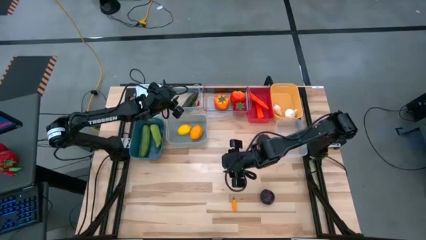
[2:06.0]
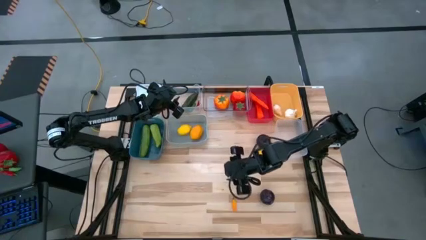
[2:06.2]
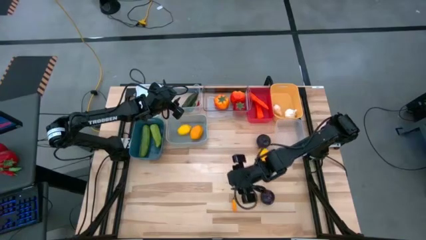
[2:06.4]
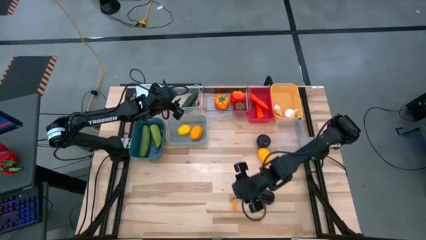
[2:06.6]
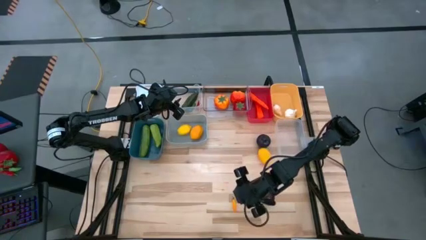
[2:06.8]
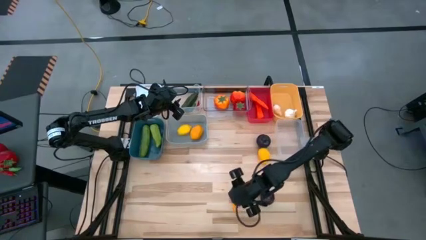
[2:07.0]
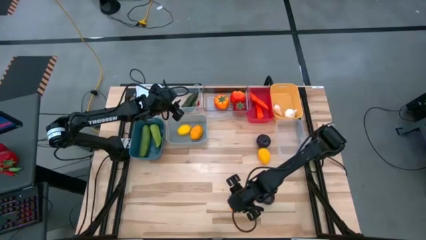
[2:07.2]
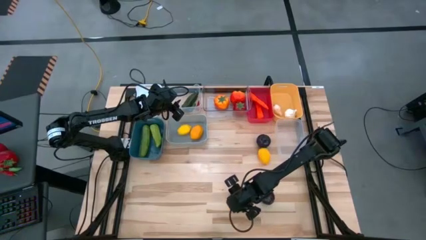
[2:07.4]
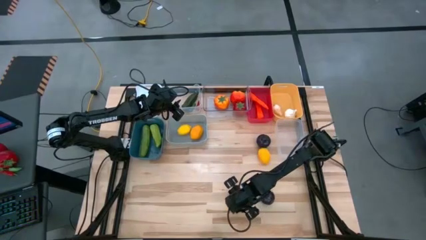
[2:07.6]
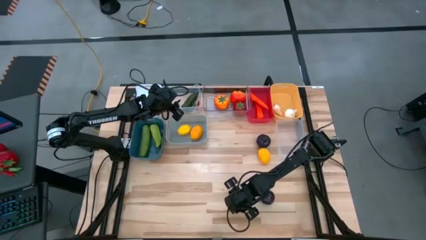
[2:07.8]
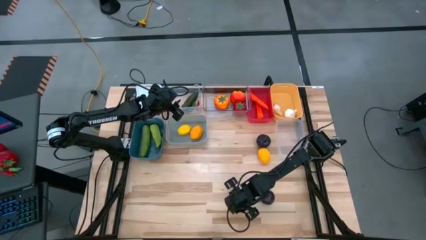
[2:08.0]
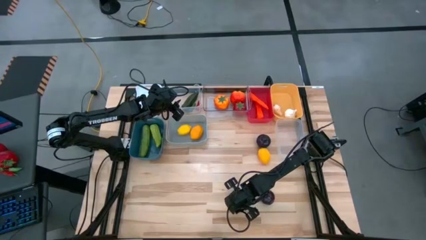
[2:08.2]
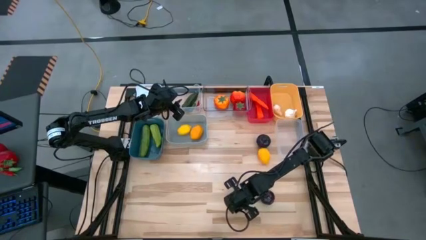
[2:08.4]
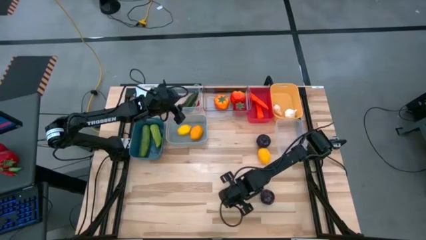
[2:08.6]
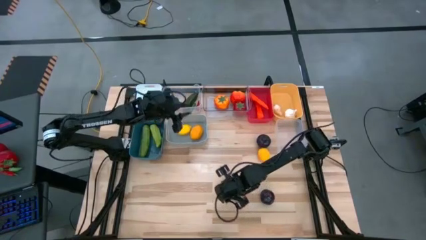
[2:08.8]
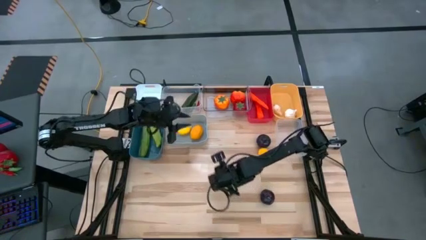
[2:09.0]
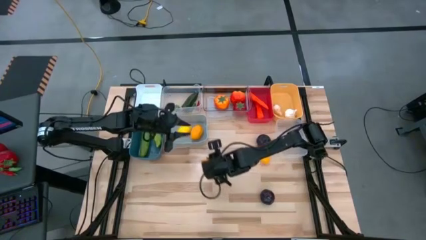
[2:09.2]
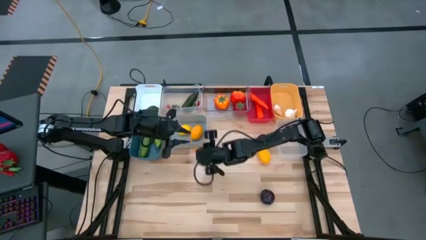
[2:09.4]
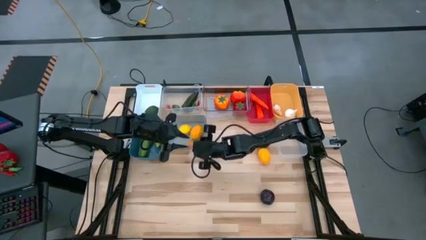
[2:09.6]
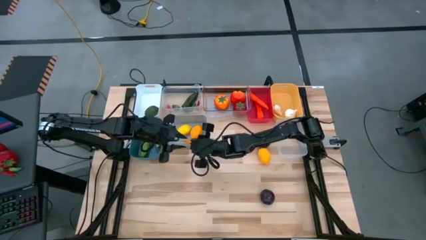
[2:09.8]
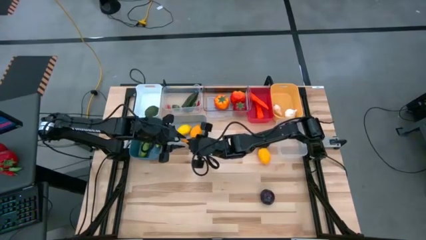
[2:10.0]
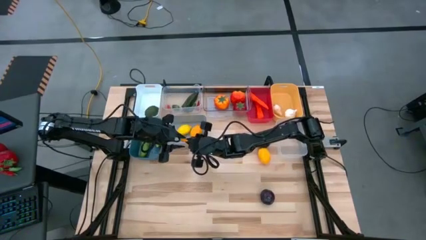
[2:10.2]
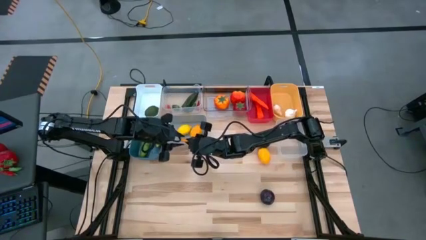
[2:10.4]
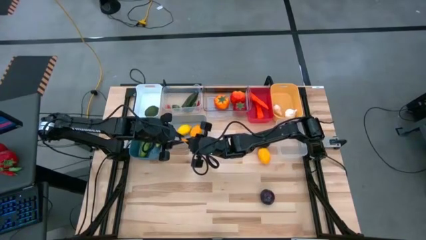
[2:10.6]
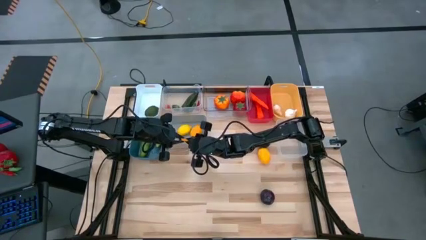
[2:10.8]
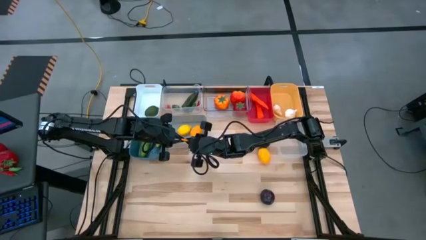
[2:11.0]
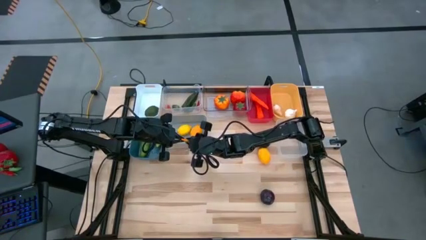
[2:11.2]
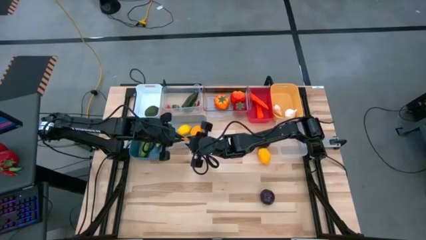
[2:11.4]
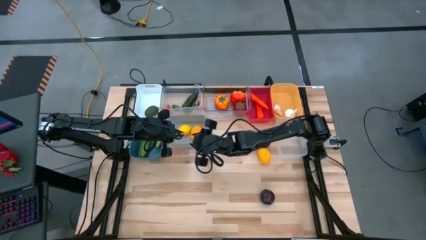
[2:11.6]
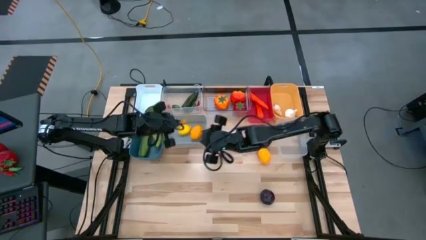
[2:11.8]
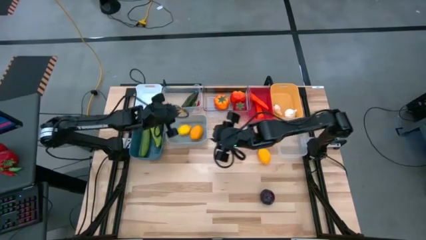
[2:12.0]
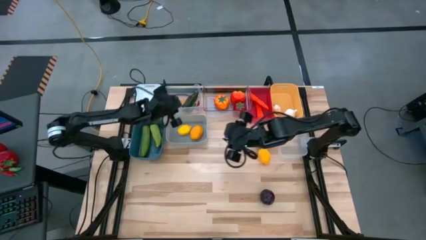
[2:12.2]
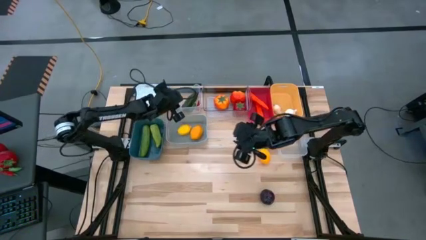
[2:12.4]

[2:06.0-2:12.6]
Task: Sort produce into baskets
Put the yellow chili pepper into the top left transparent bin

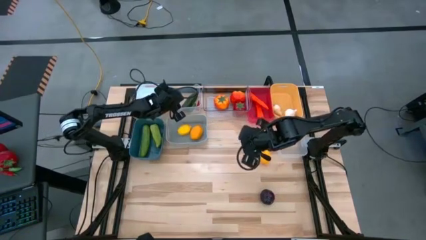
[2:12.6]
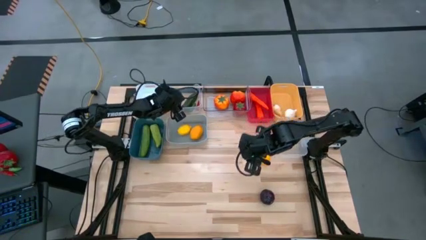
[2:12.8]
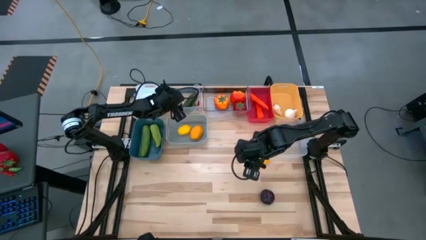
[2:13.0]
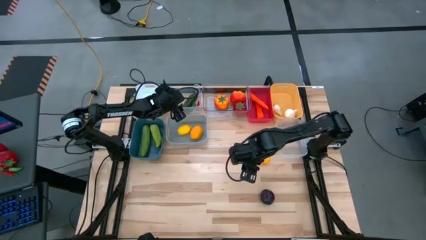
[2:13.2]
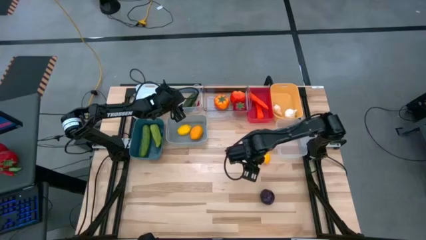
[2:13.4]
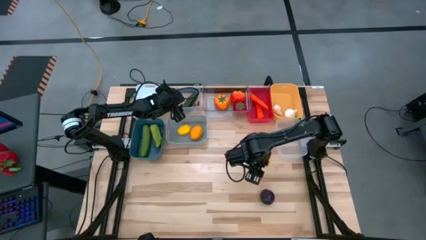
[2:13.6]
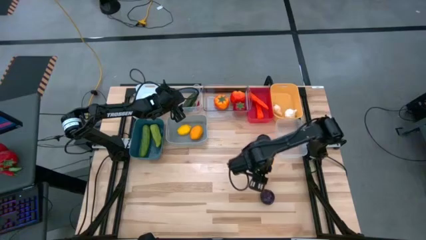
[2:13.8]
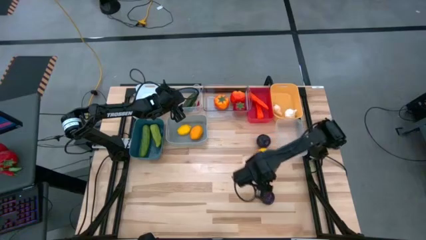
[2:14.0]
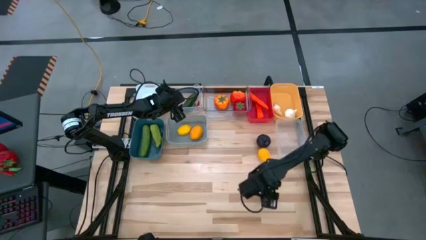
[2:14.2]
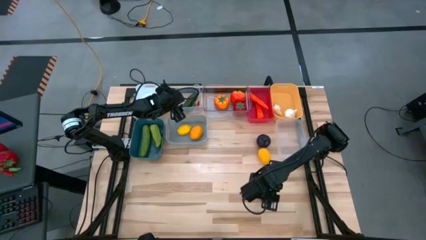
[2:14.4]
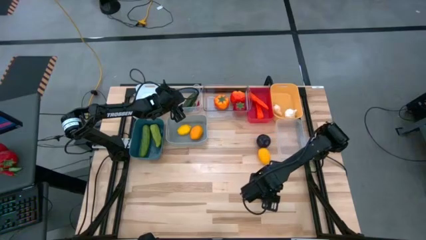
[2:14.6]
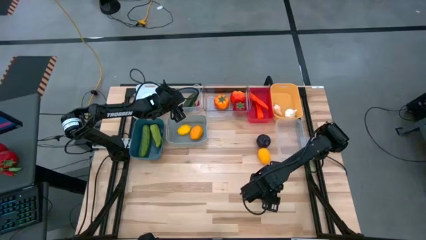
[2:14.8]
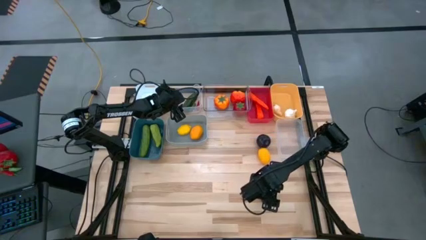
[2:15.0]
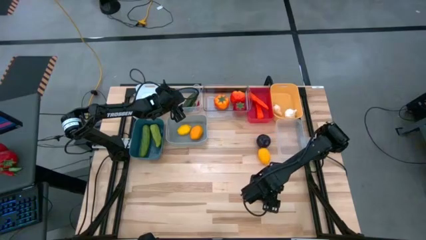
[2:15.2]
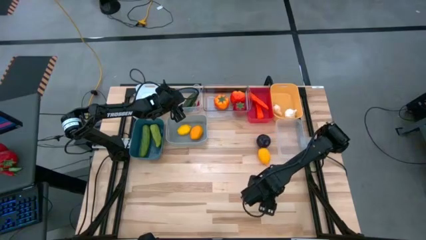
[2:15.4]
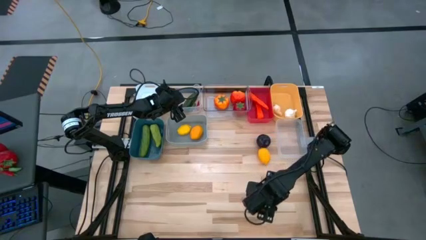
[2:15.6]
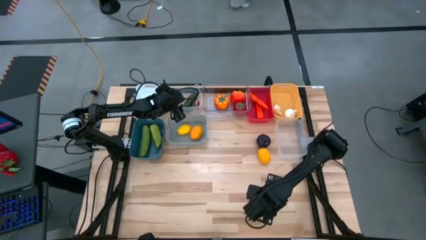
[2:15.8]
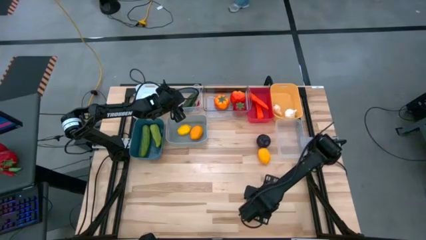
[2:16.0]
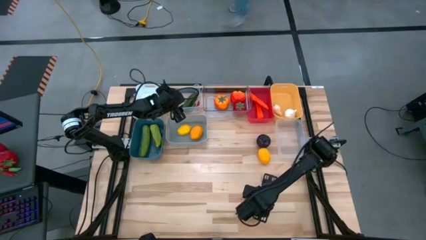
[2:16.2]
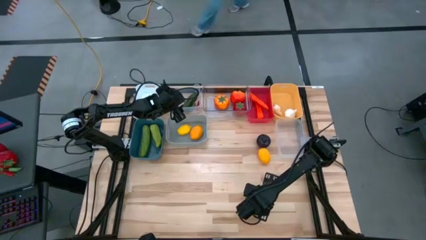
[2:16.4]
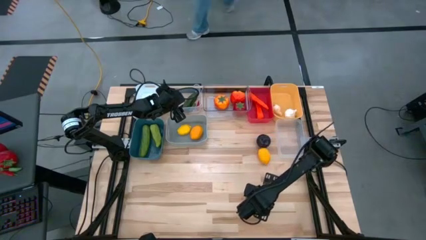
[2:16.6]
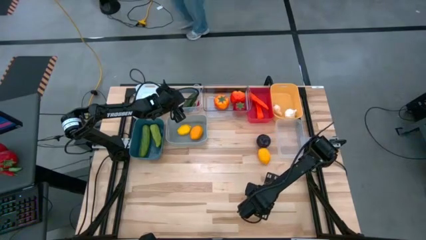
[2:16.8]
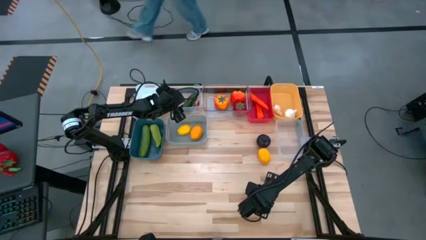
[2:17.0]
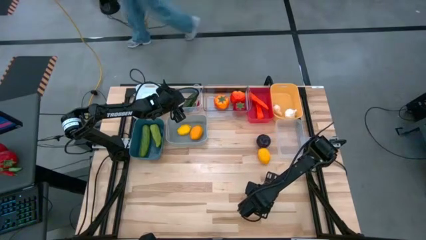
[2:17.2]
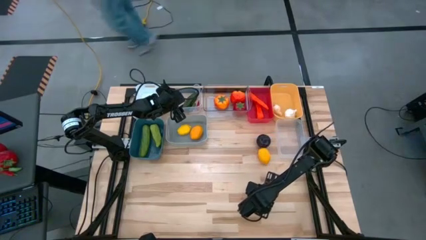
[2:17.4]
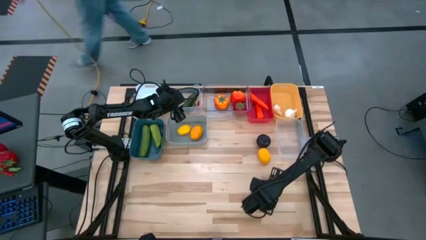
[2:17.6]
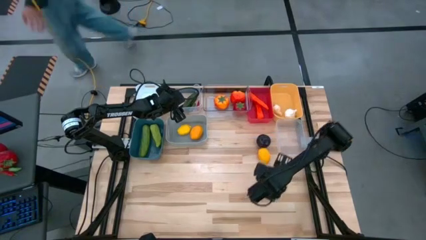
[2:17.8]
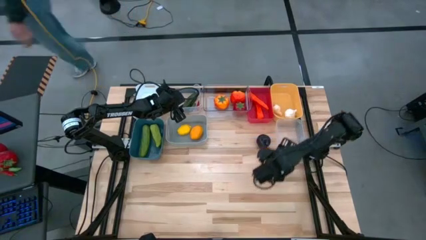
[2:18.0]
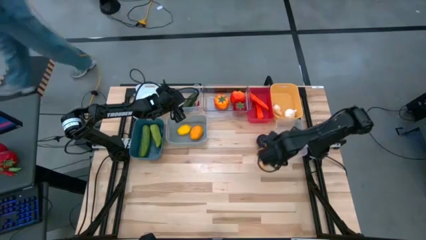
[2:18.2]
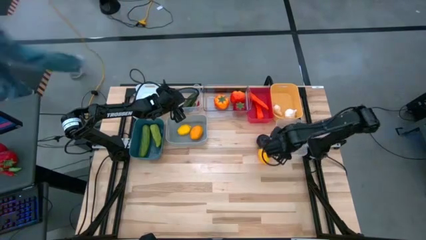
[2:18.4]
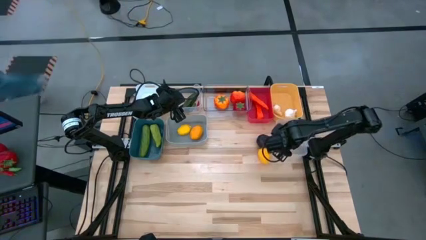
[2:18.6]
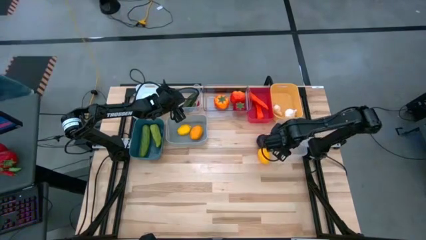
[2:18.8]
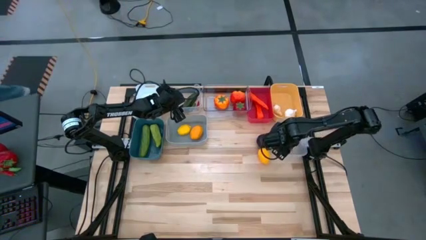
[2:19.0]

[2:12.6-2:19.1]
Put the bottom black plum into the bottom transparent bin

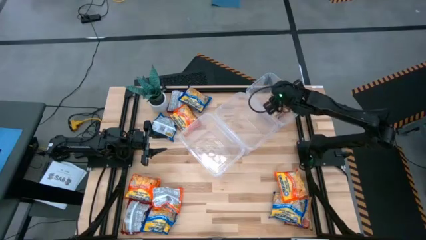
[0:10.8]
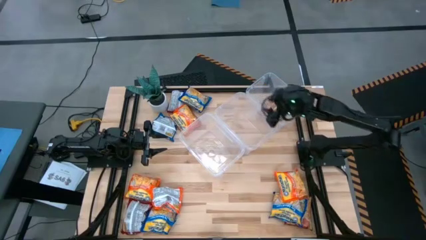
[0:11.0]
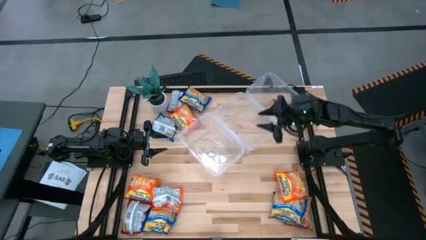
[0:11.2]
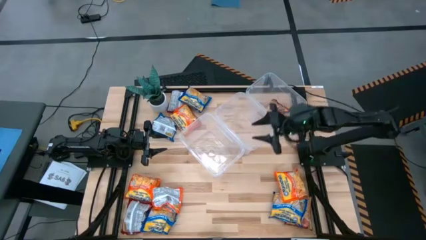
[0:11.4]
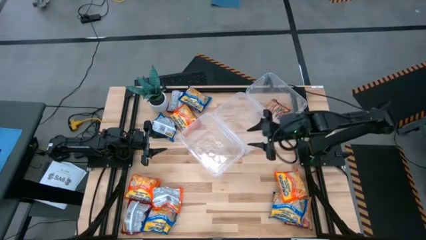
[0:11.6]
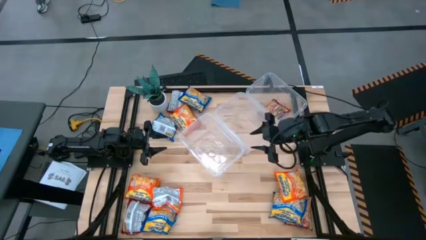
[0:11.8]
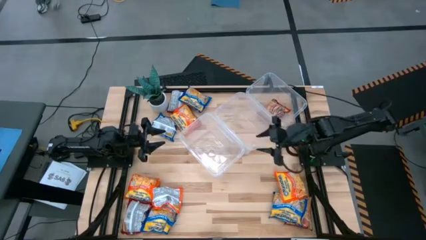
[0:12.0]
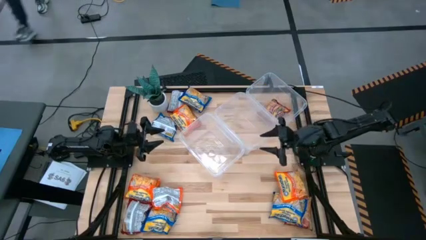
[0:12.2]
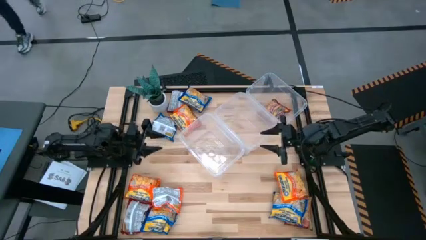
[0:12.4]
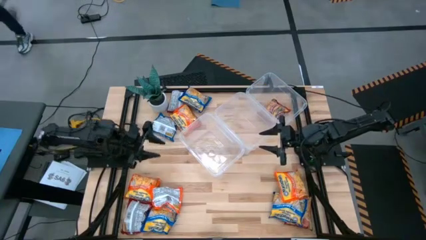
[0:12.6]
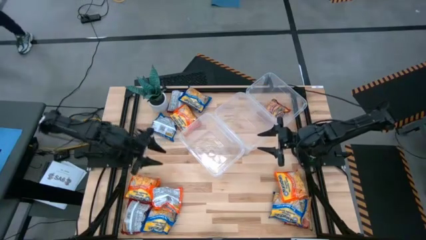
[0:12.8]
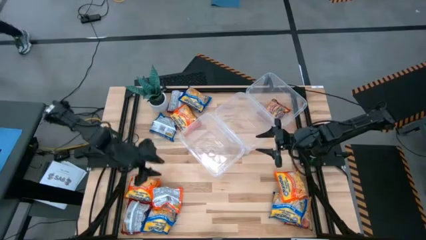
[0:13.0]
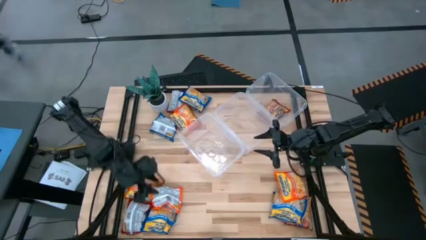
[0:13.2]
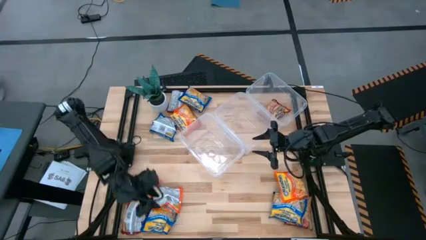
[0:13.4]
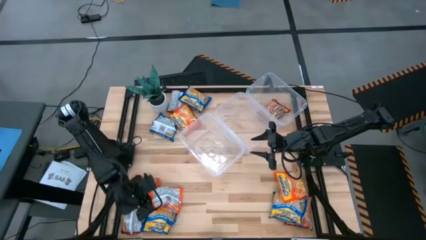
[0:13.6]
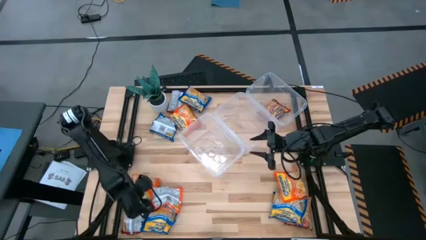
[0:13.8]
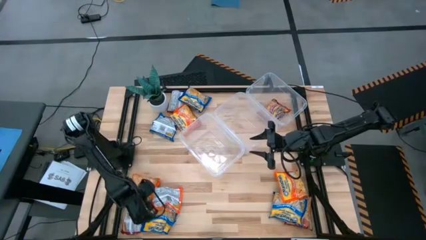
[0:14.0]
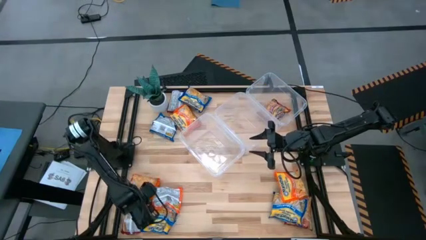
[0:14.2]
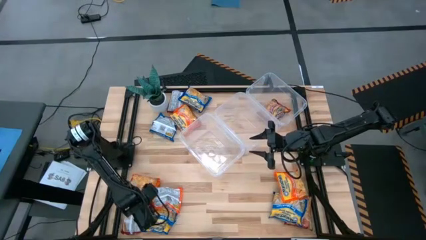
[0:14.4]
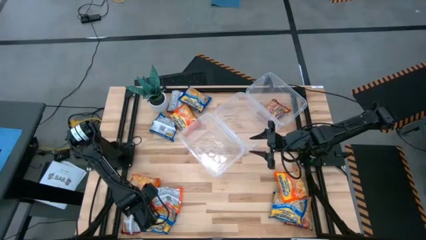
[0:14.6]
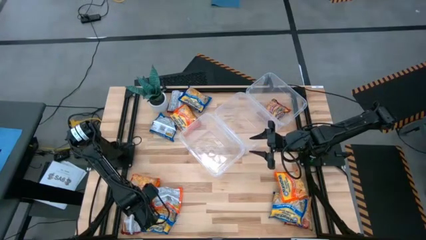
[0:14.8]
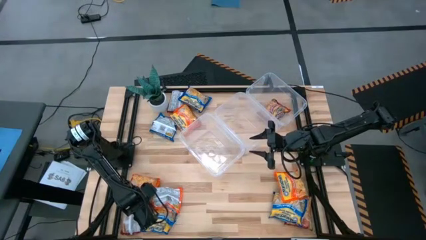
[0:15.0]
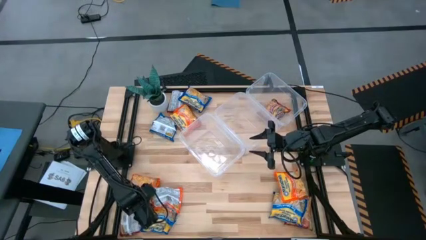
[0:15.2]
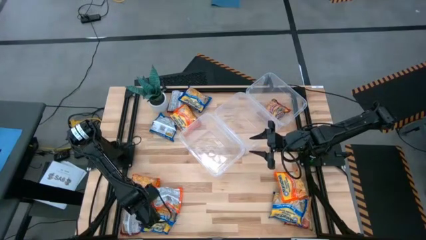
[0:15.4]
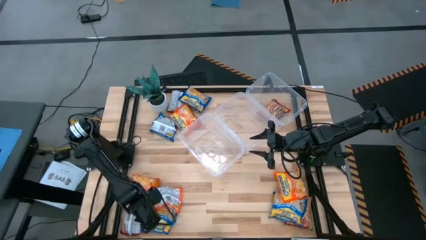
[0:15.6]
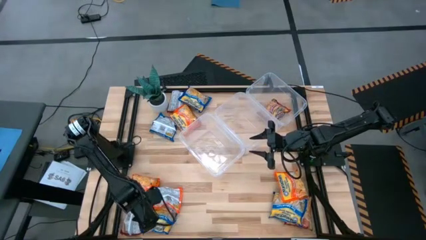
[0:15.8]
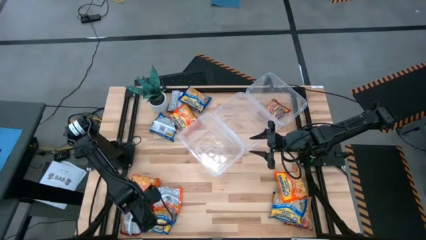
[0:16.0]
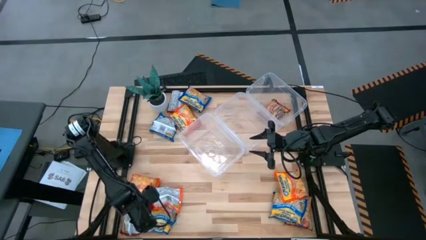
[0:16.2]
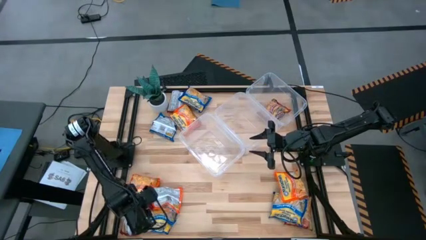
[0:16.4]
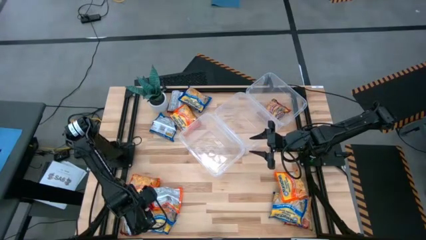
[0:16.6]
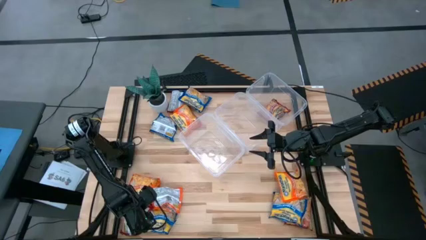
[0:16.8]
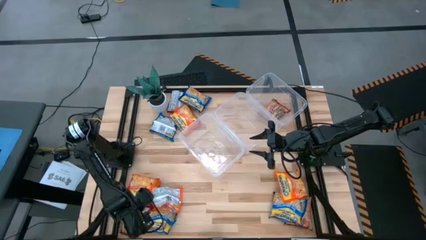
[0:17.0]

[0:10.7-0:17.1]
Task: Sort Maruchan noodles
Put the red noodle pack into the top right transparent bin
